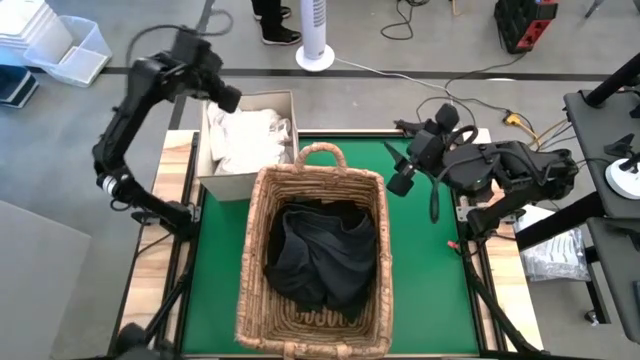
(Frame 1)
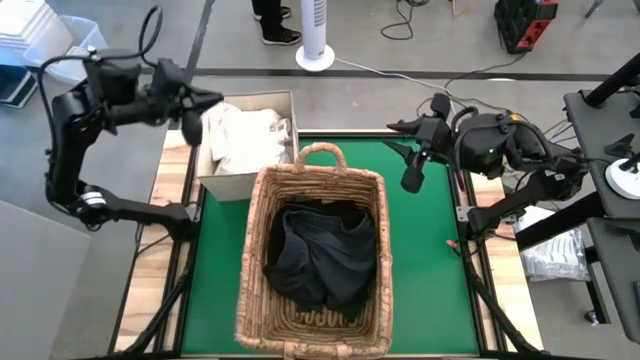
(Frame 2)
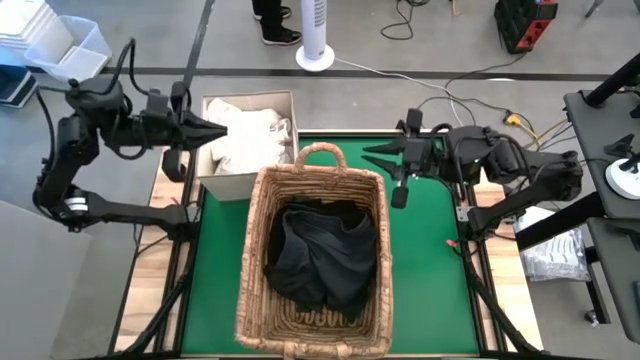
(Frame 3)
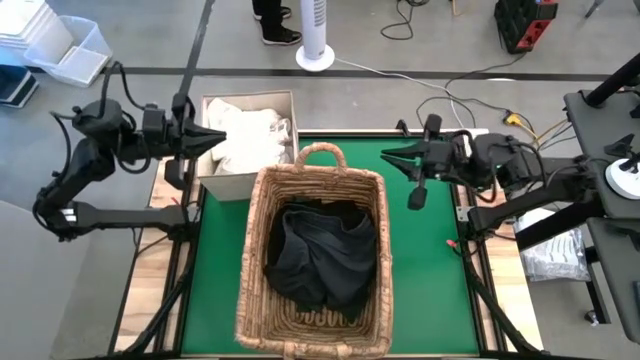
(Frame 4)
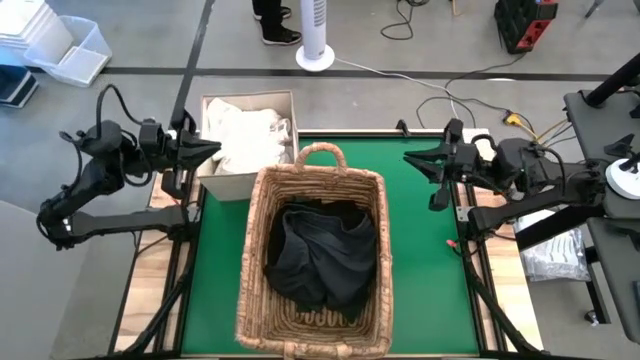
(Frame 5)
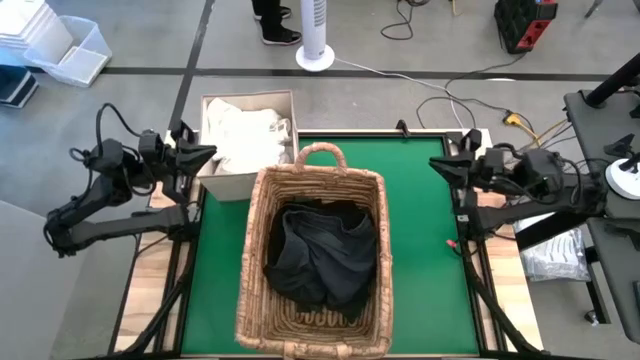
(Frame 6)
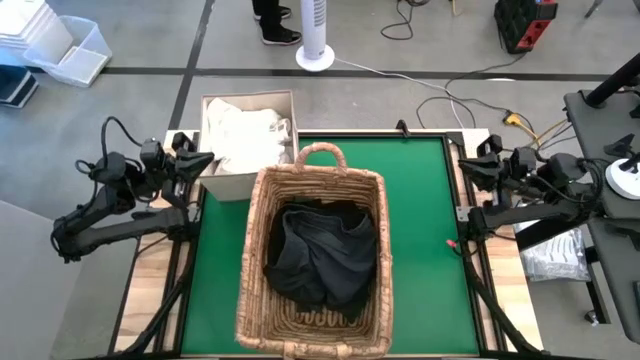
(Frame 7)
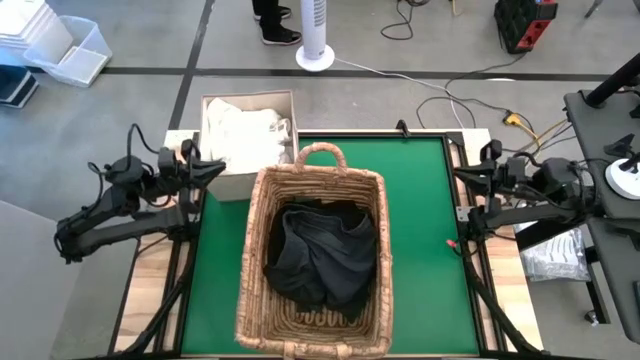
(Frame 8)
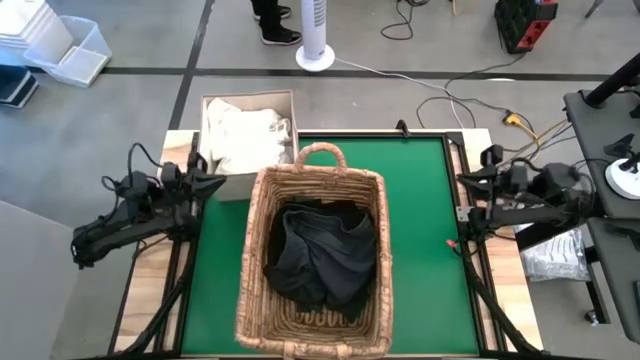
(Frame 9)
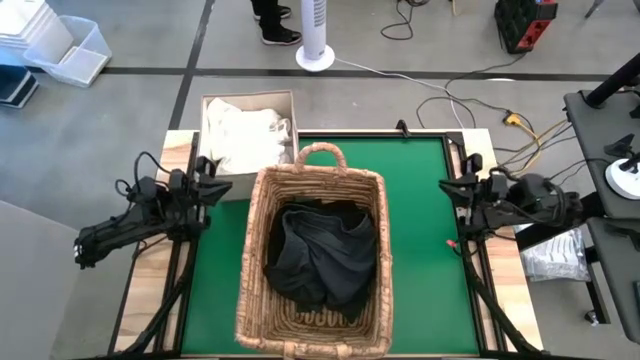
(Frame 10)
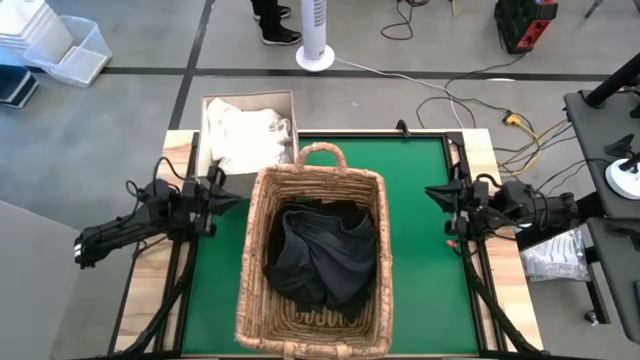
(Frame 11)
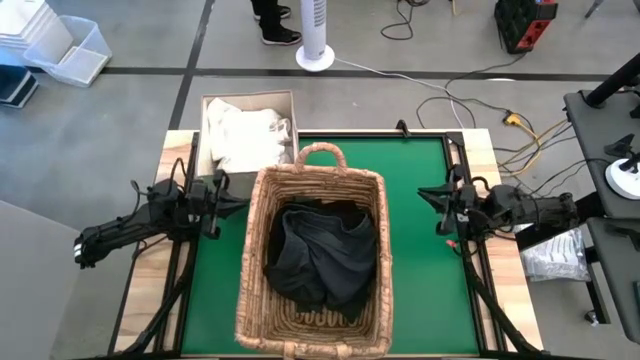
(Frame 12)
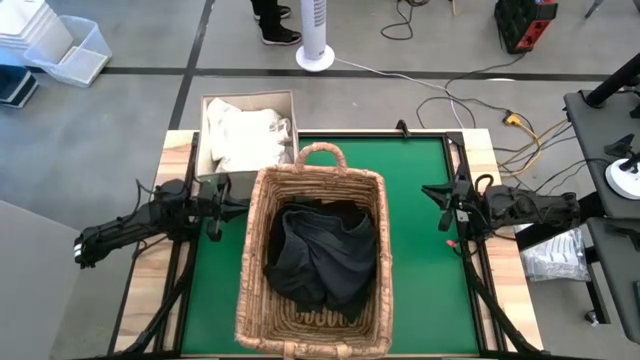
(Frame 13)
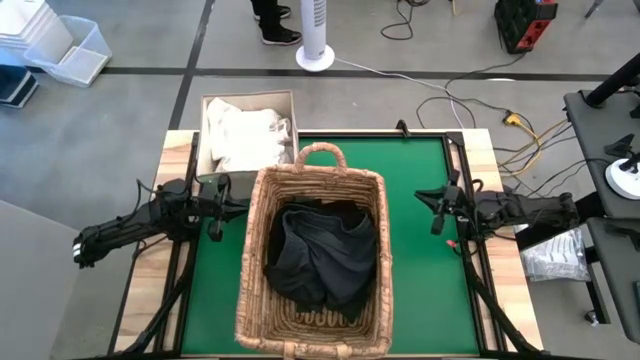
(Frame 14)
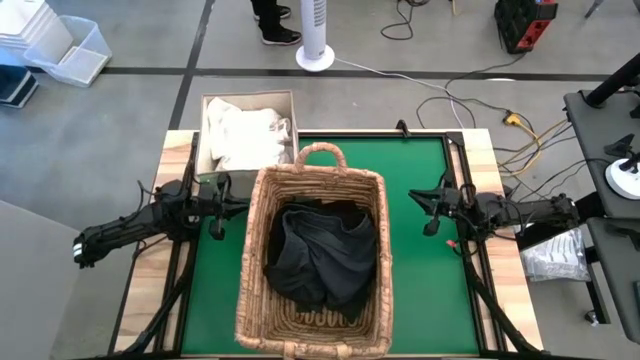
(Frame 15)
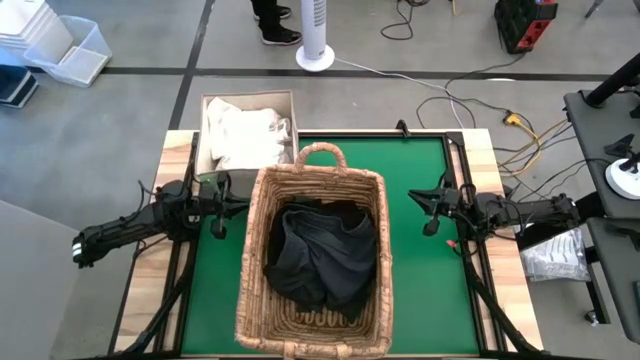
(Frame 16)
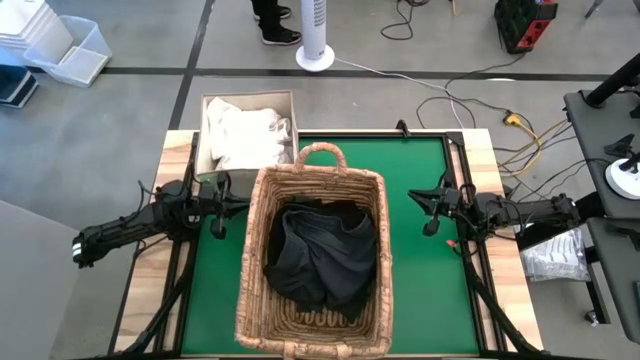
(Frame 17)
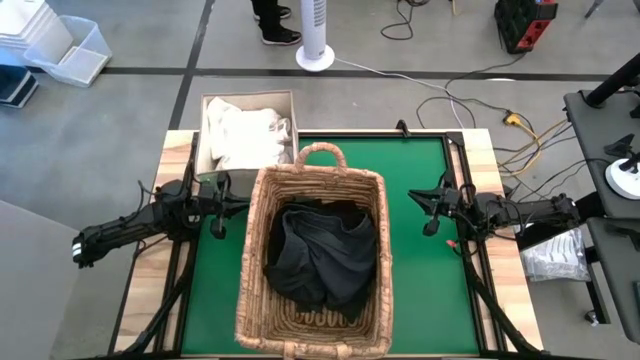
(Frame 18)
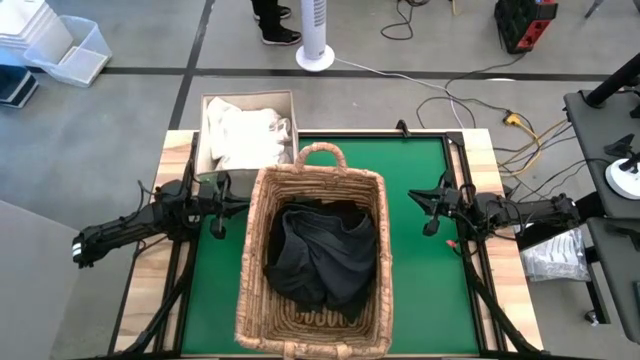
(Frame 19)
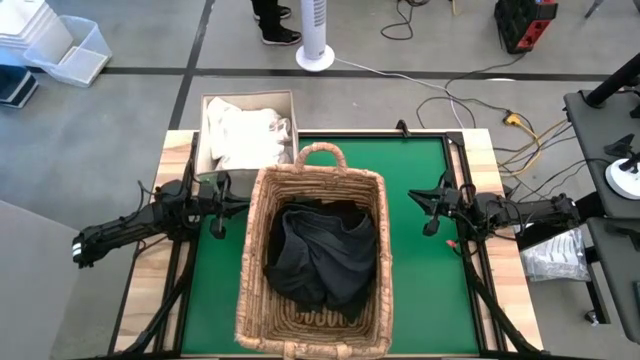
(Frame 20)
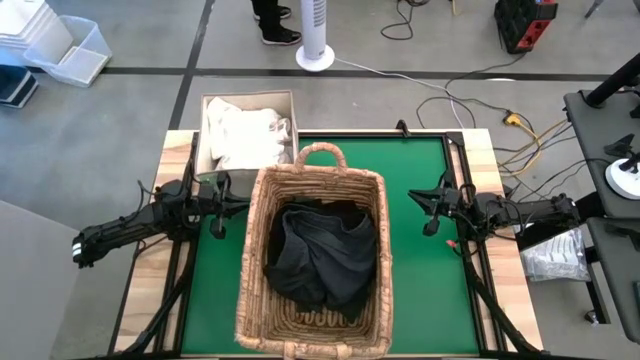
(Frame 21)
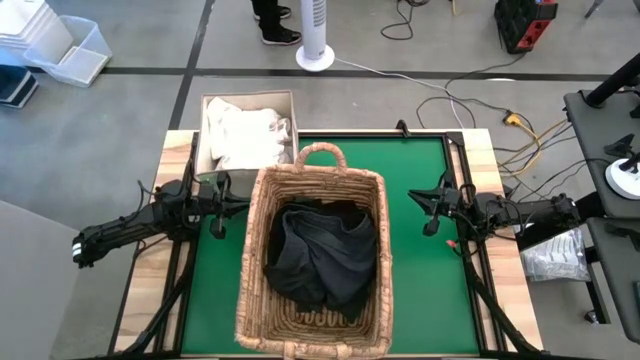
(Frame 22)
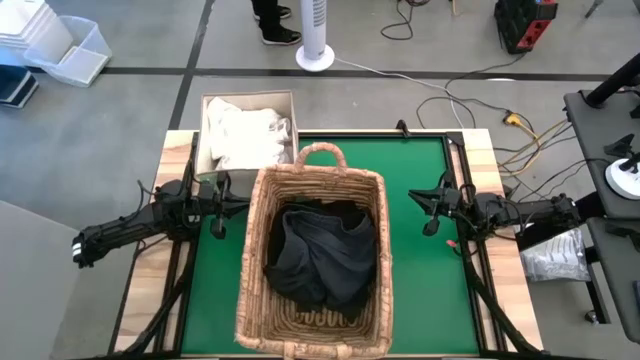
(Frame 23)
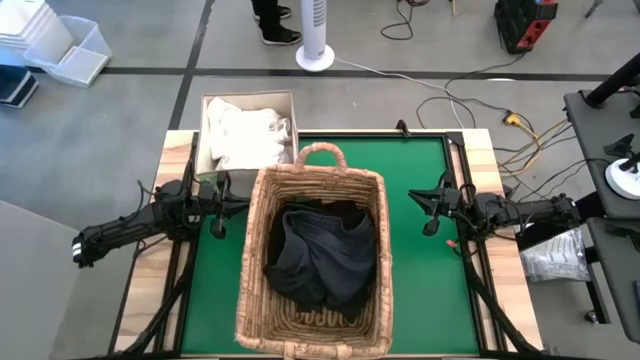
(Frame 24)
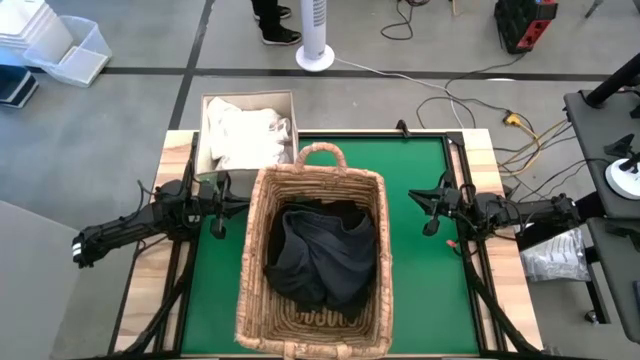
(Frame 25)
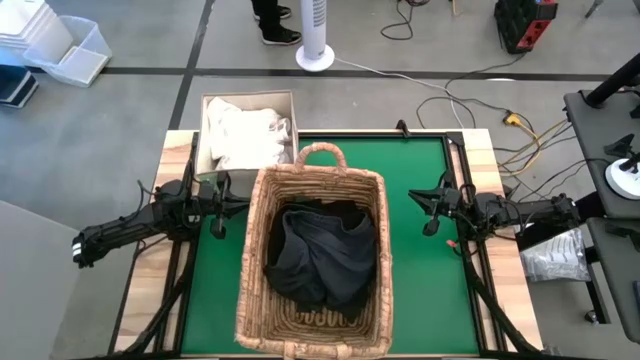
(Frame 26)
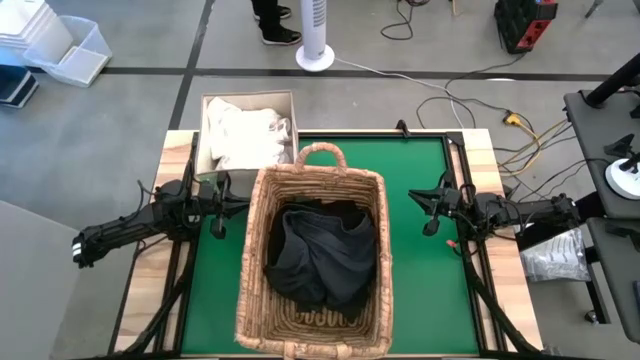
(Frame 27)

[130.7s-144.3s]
Return to Home Position

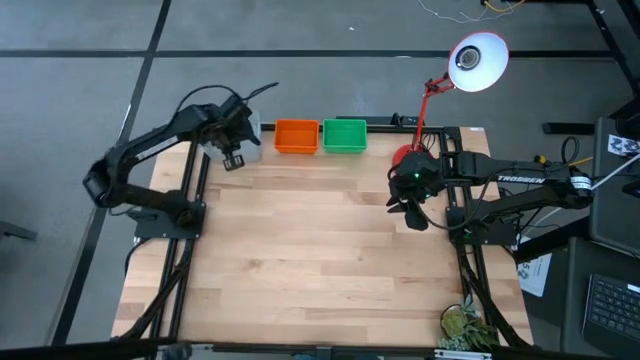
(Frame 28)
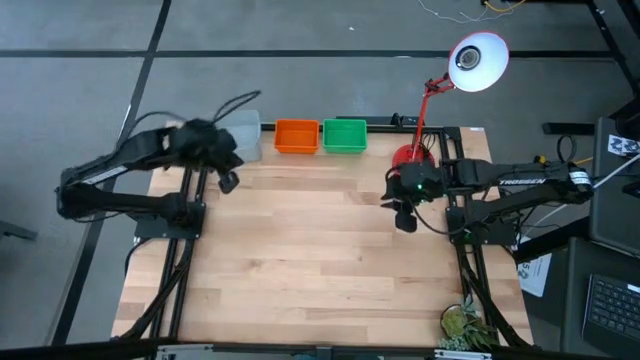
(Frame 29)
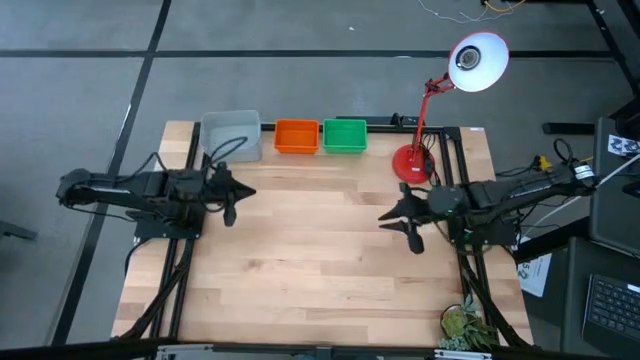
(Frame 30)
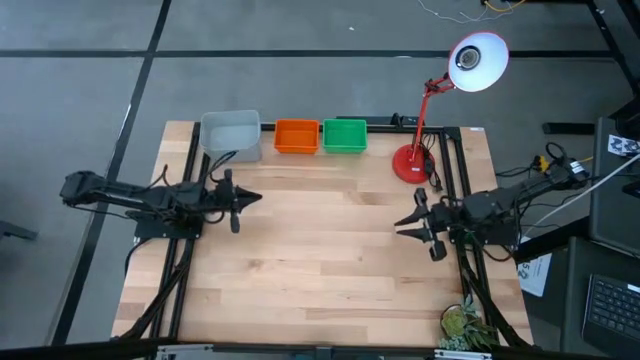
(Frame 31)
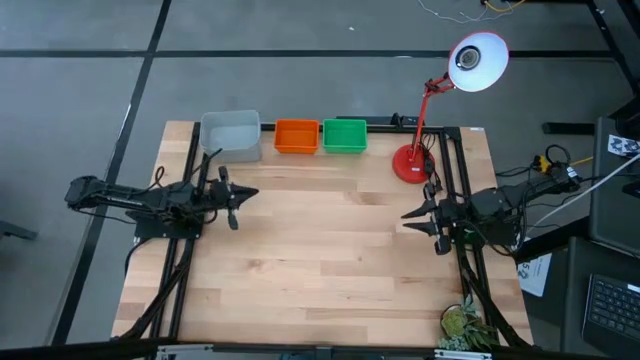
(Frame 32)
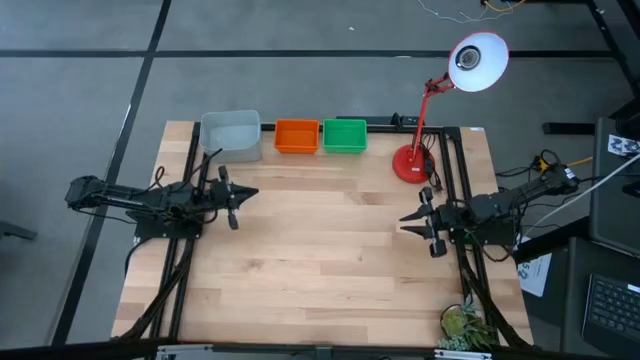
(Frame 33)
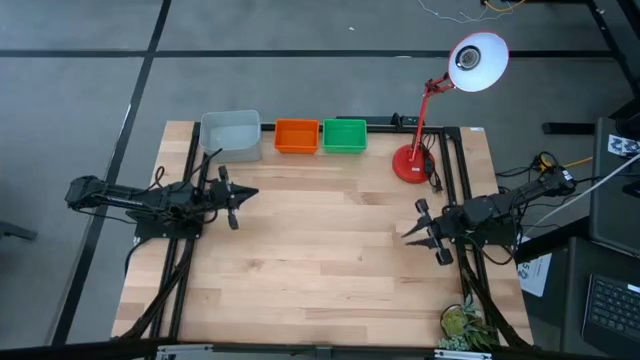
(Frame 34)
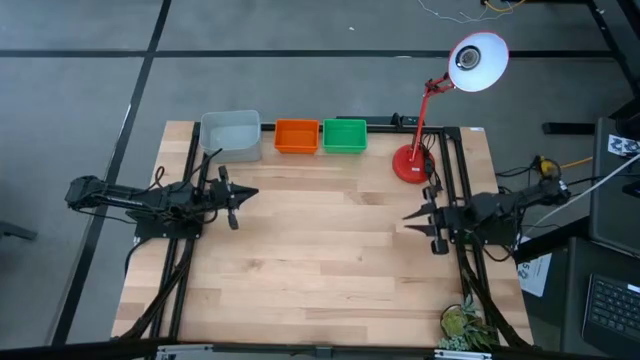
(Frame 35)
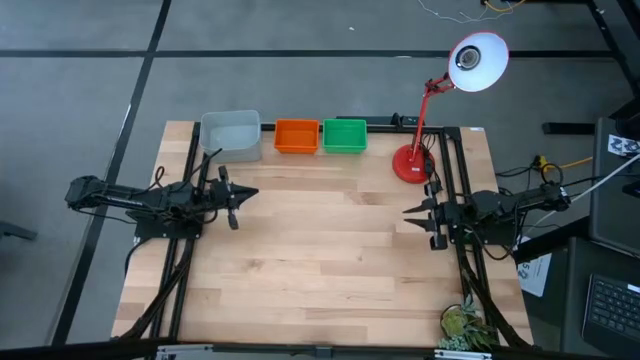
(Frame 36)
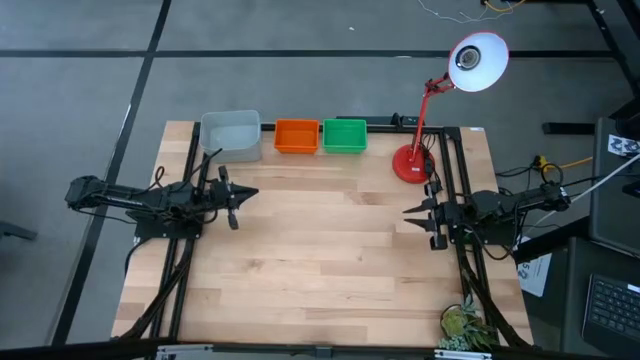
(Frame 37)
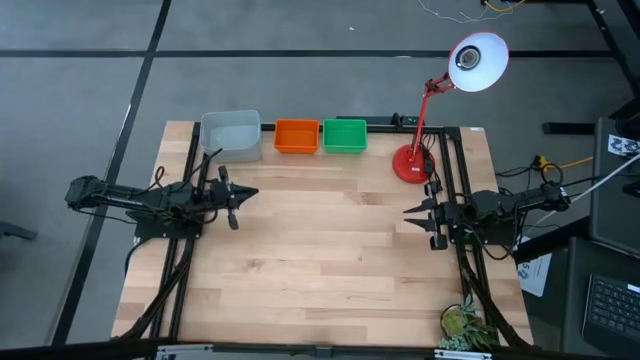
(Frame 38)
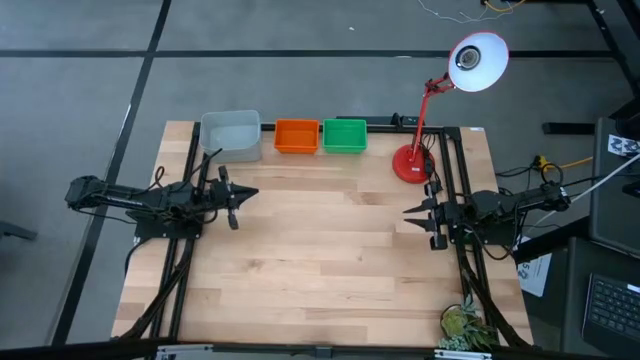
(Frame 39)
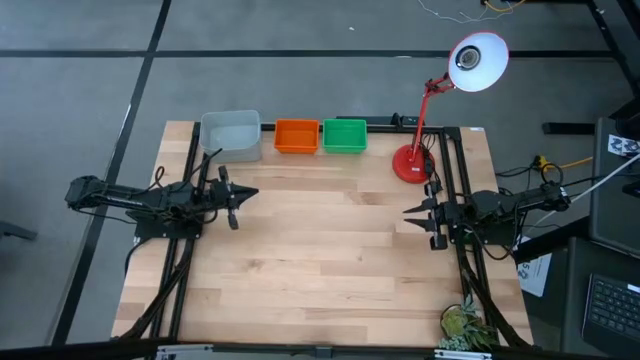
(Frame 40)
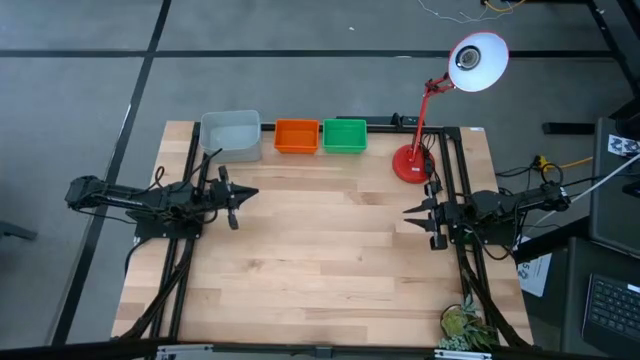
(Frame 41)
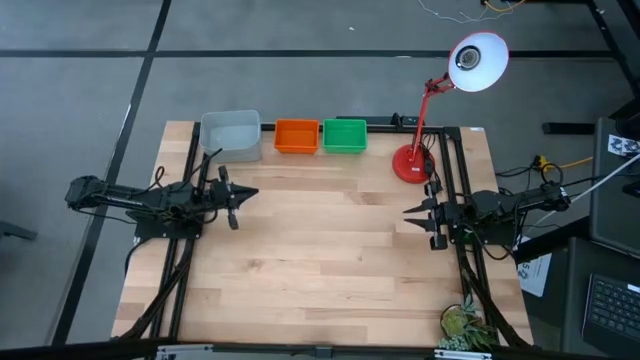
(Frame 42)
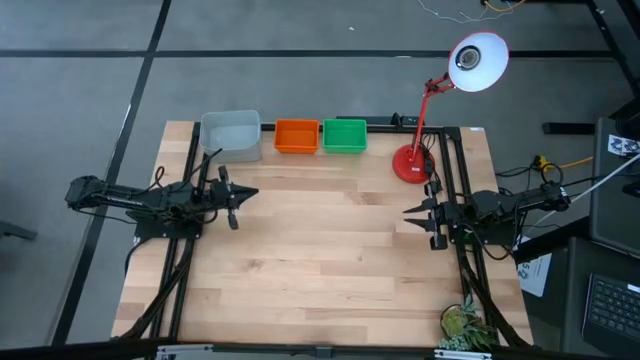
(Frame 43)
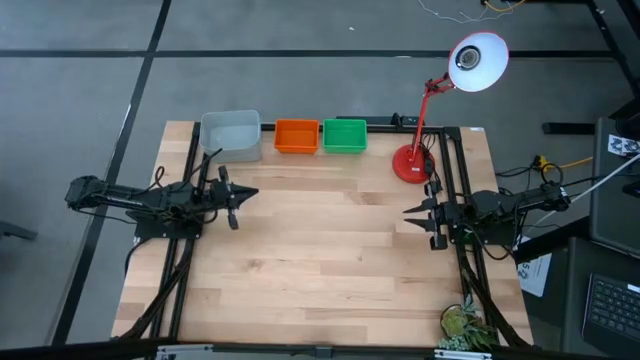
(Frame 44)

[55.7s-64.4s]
Return to Home Position
